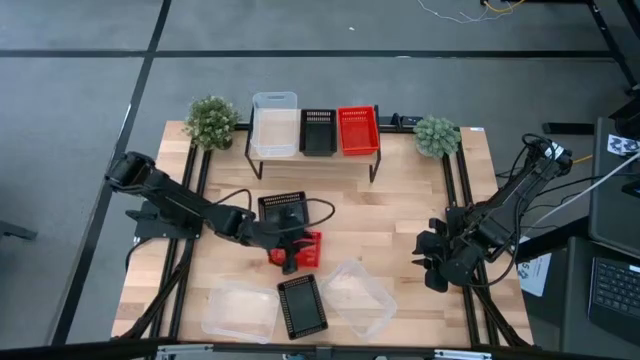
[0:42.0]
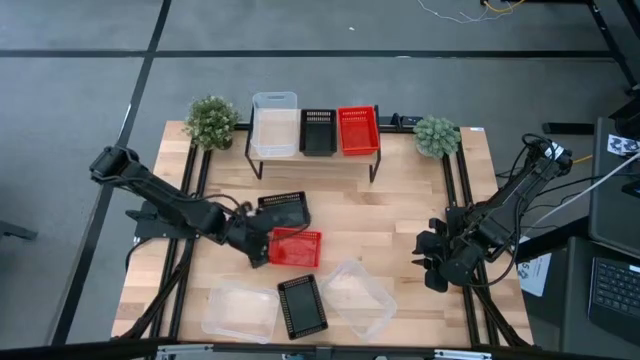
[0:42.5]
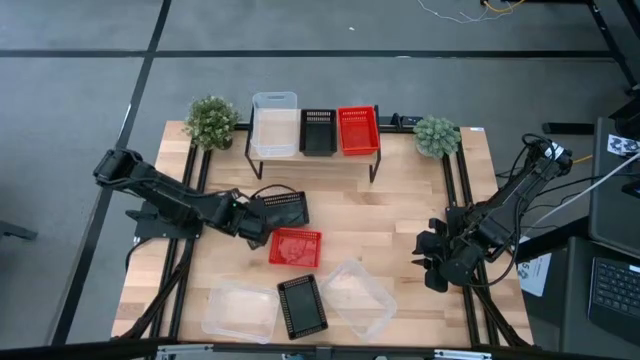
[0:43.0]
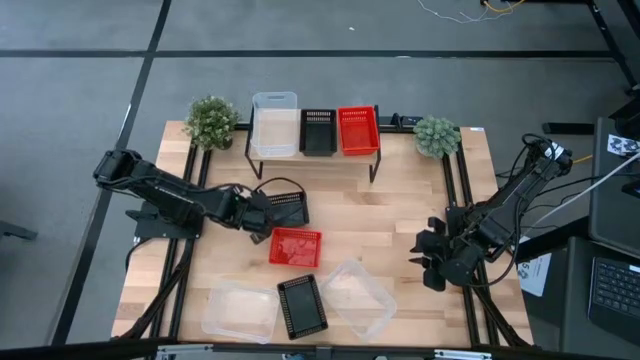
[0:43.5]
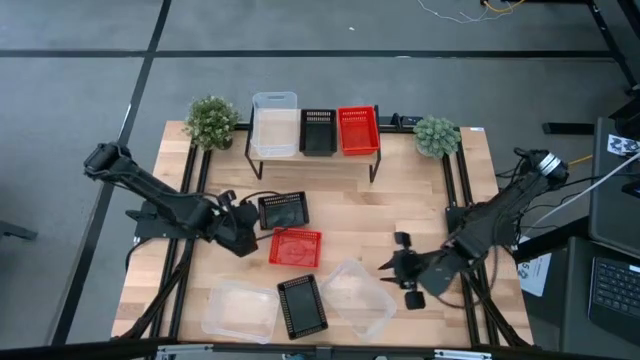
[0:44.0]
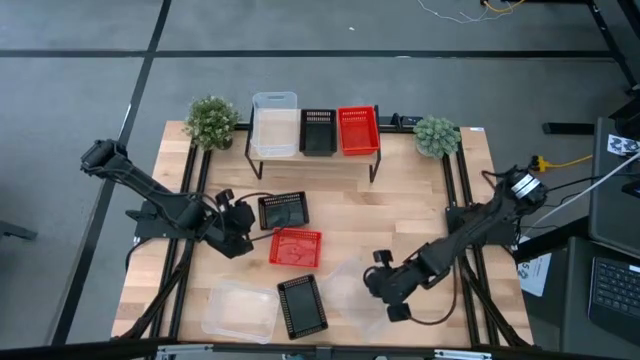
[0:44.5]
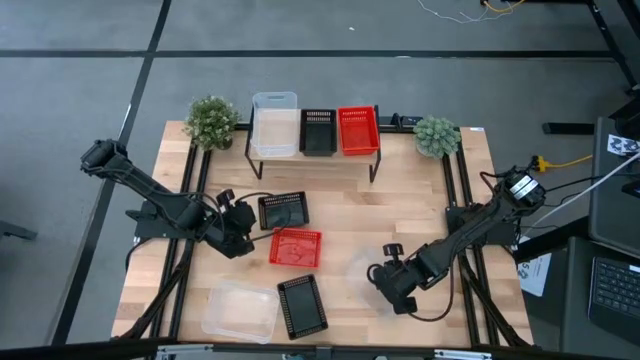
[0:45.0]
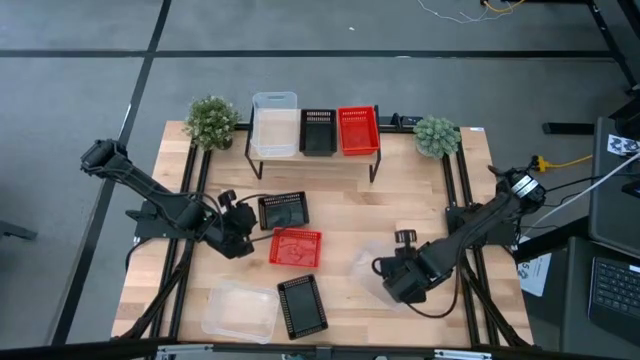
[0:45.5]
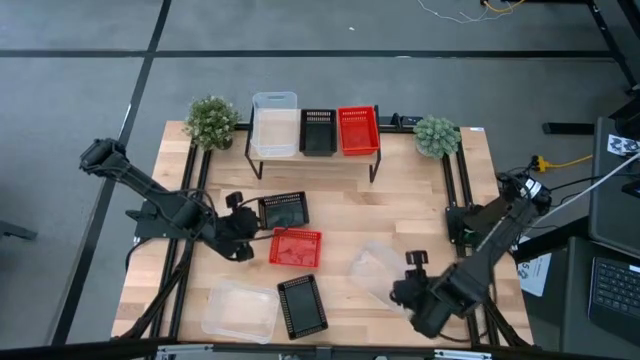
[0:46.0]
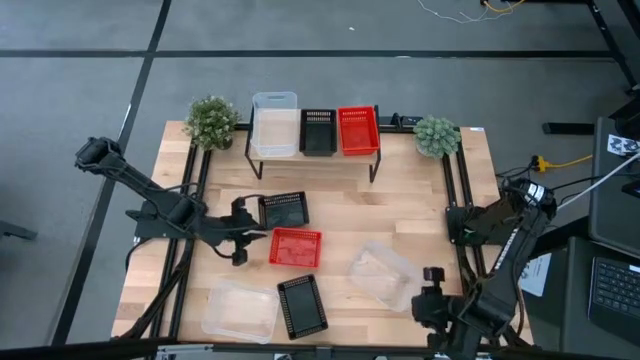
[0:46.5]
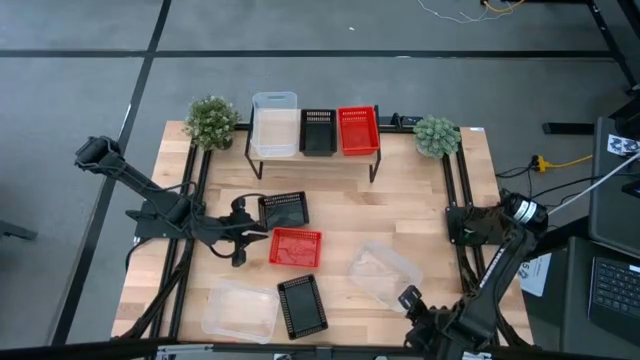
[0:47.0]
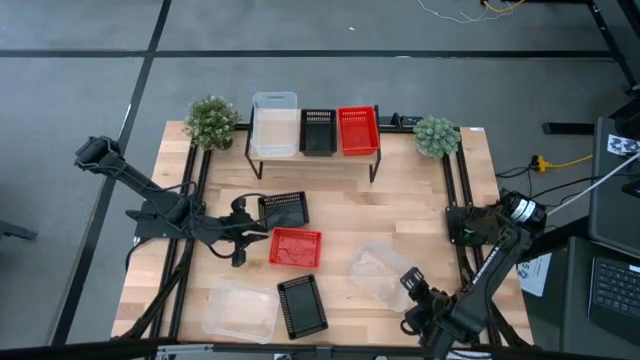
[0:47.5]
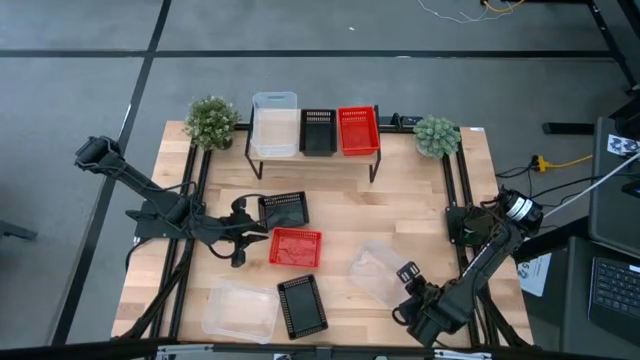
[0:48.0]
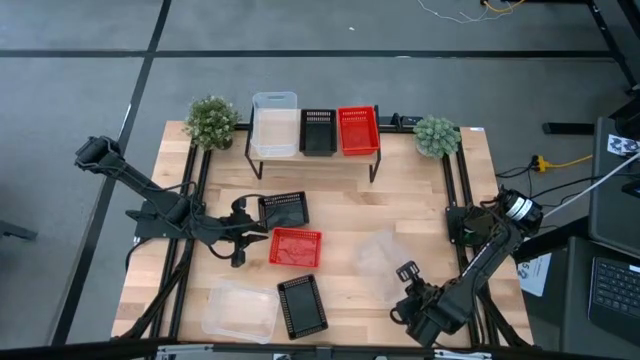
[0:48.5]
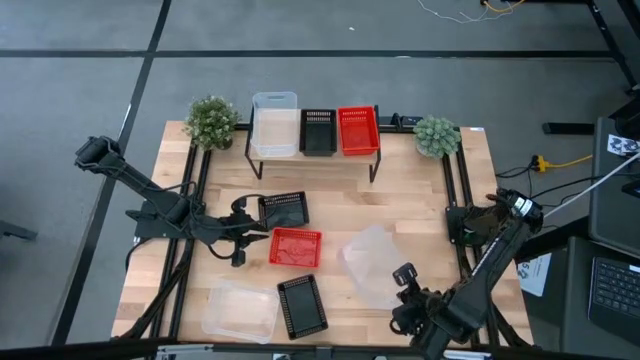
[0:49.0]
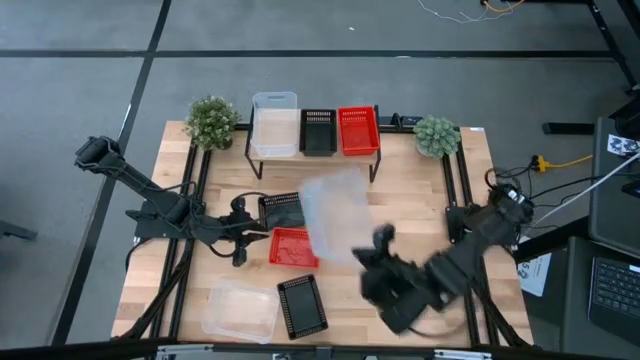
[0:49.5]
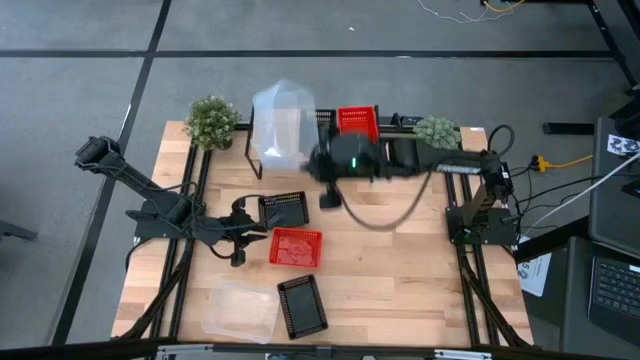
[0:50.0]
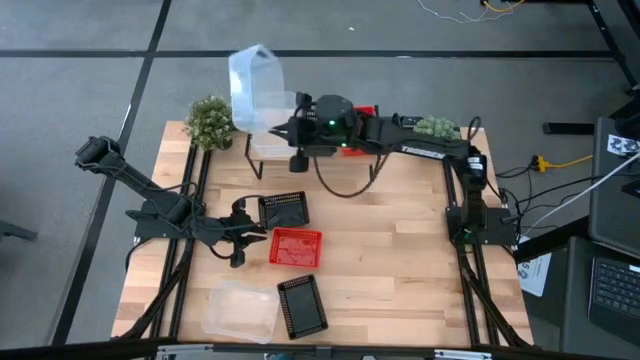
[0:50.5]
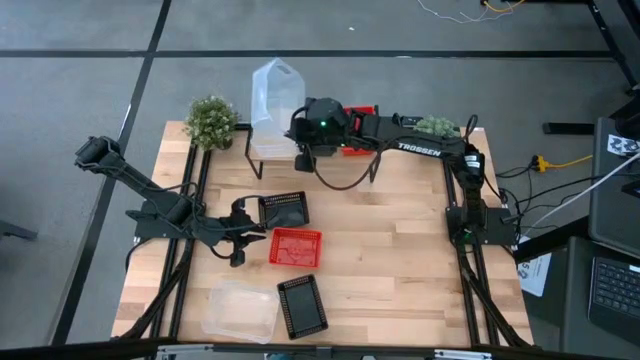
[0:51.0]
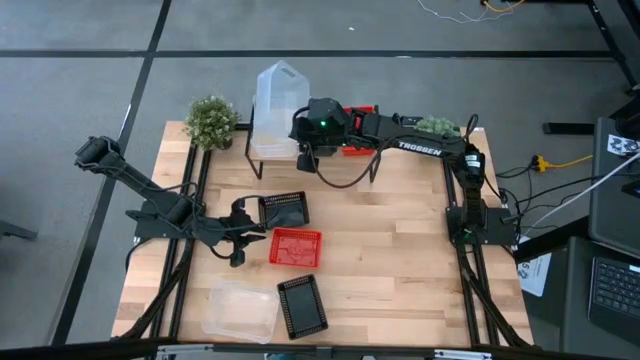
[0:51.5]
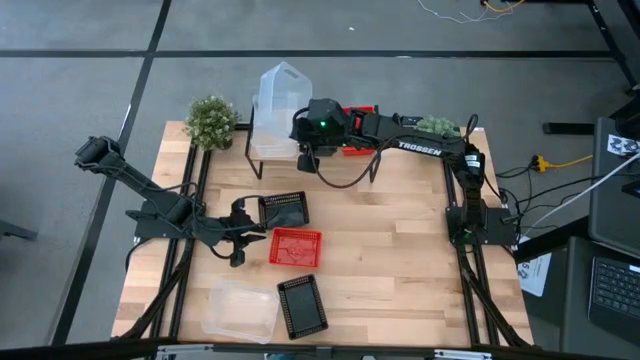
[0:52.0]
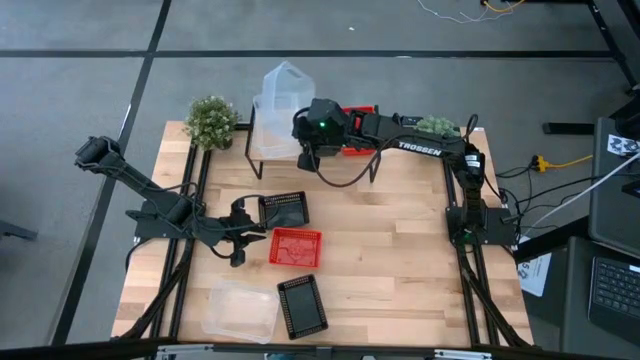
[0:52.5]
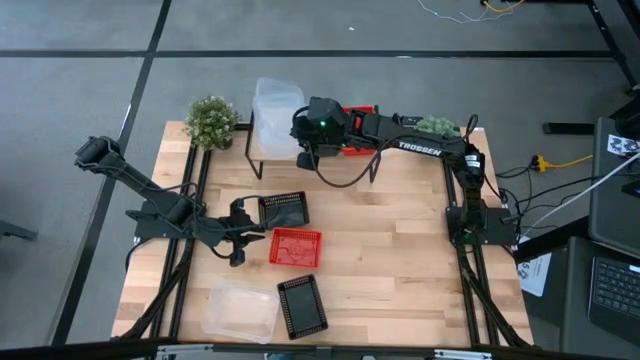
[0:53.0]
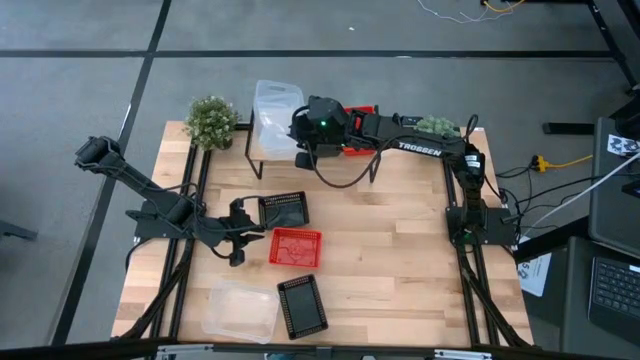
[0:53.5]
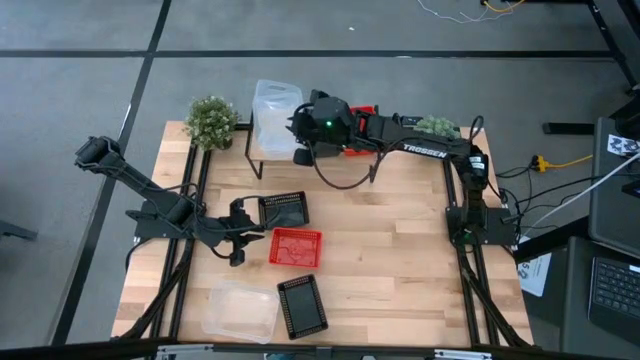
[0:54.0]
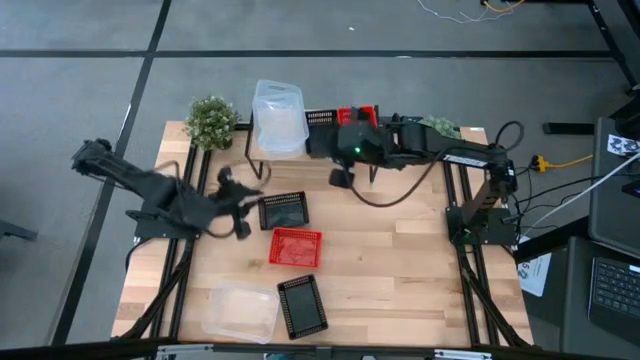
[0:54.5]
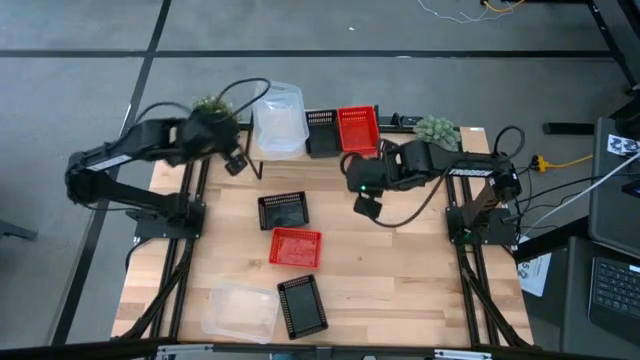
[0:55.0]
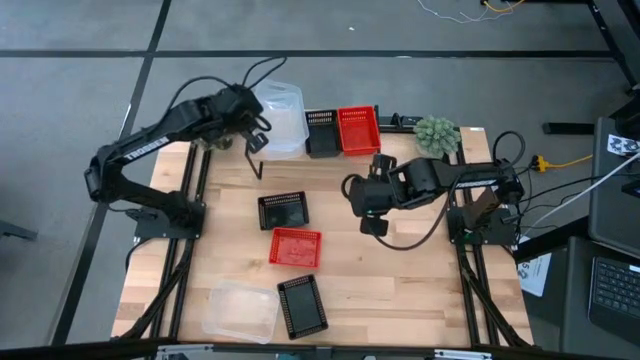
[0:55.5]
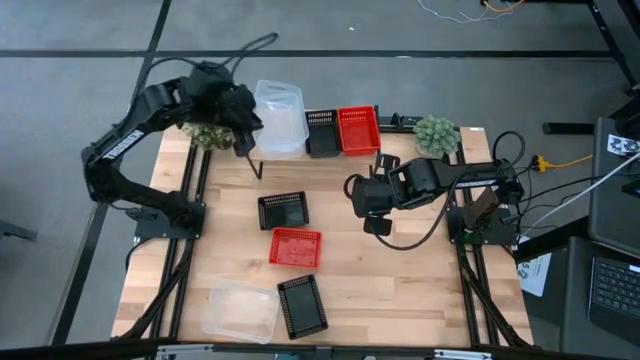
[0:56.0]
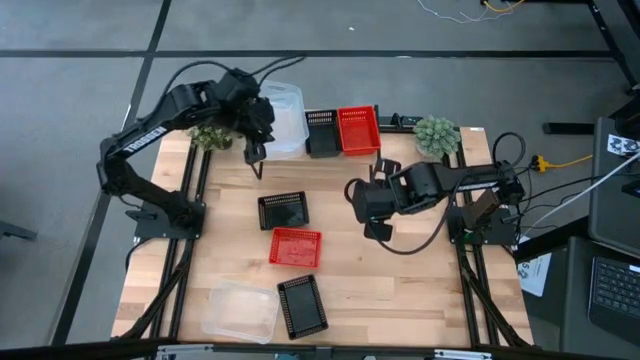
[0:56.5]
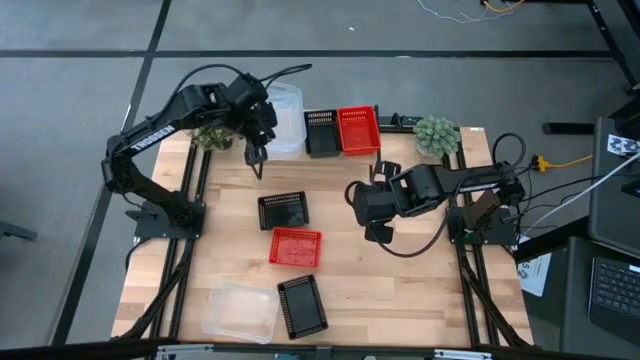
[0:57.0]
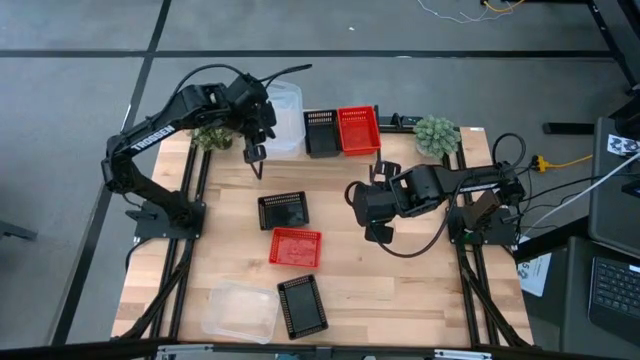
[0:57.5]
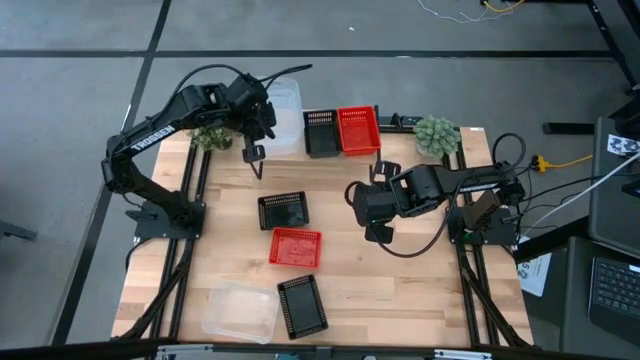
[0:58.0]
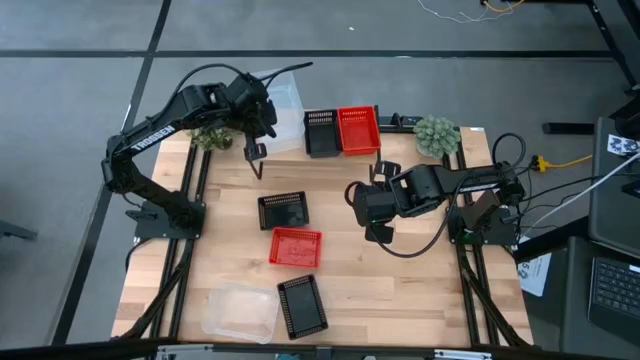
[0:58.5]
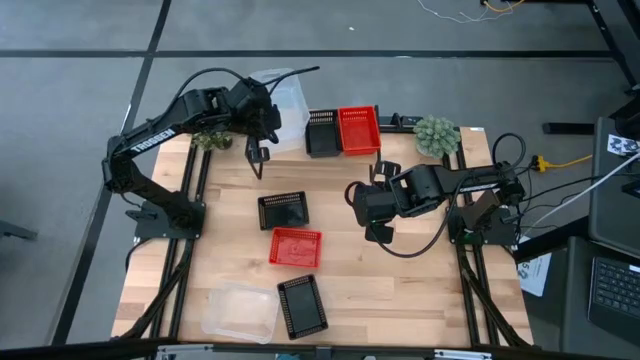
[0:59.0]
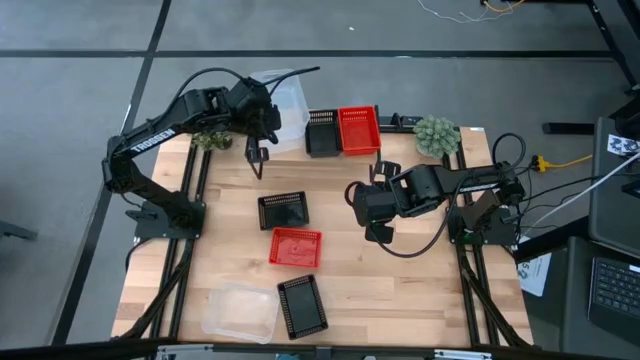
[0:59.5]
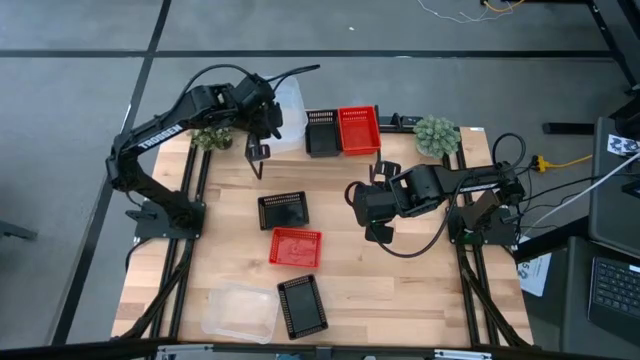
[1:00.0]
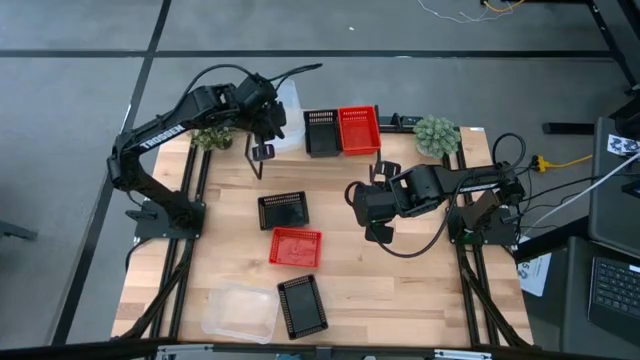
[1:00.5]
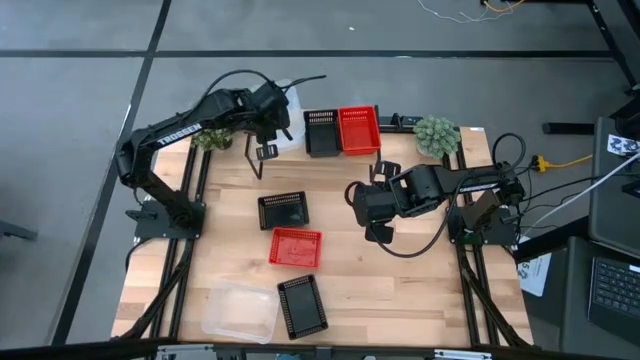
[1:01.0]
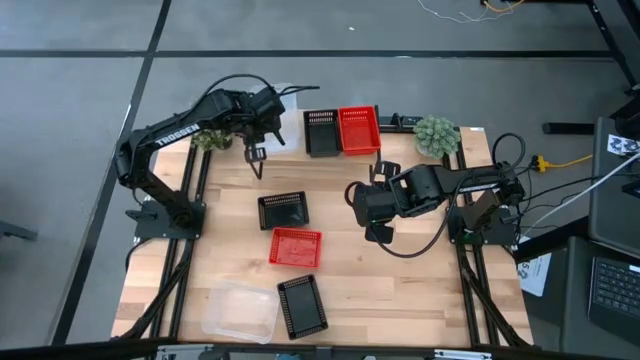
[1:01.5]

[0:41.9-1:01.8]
Task: Stack baskets on shelf by color
Stack the right transparent bin on top of the transparent bin on the shelf

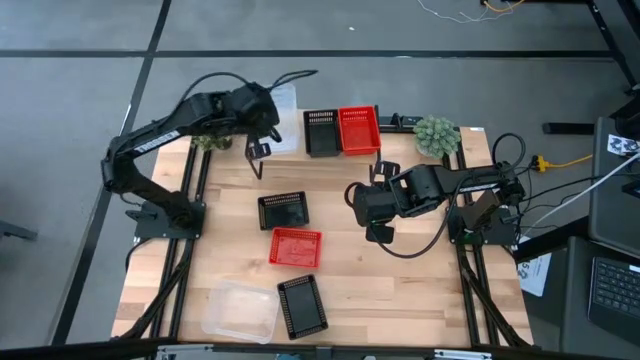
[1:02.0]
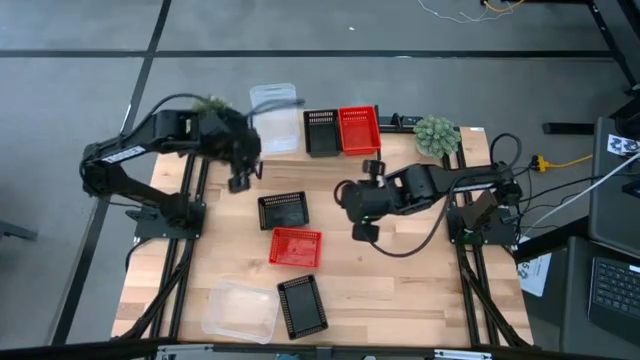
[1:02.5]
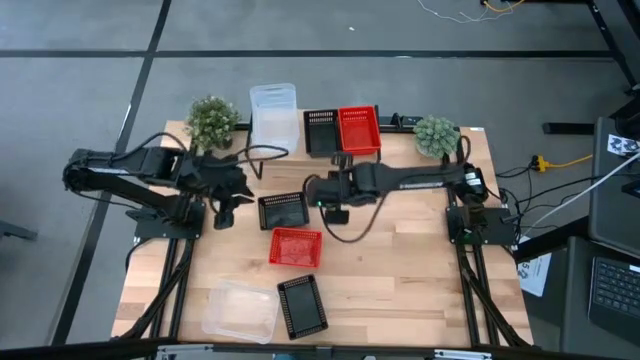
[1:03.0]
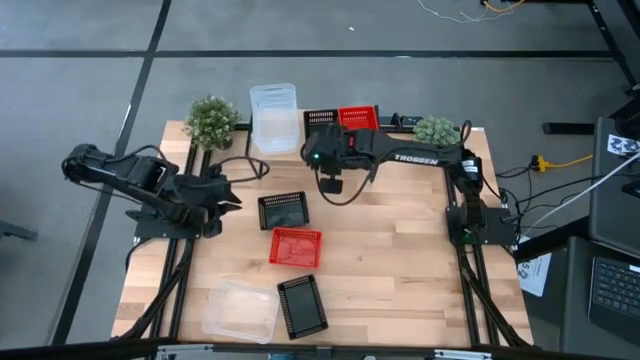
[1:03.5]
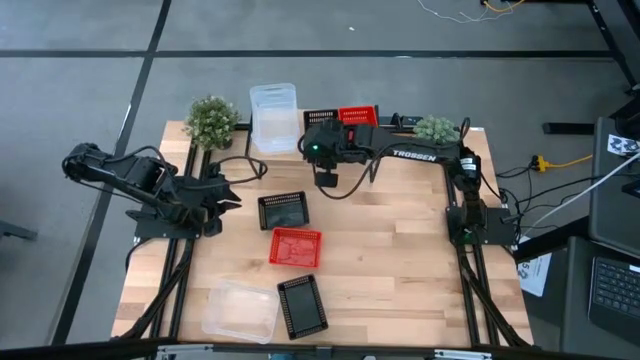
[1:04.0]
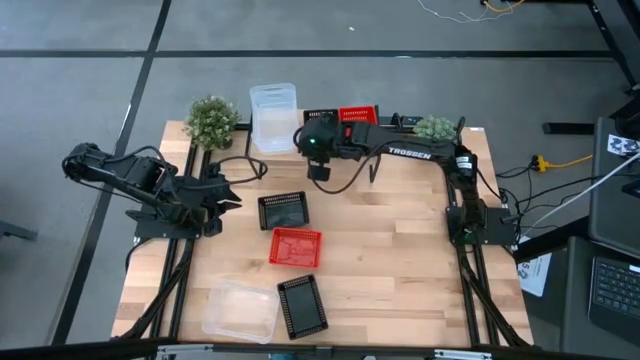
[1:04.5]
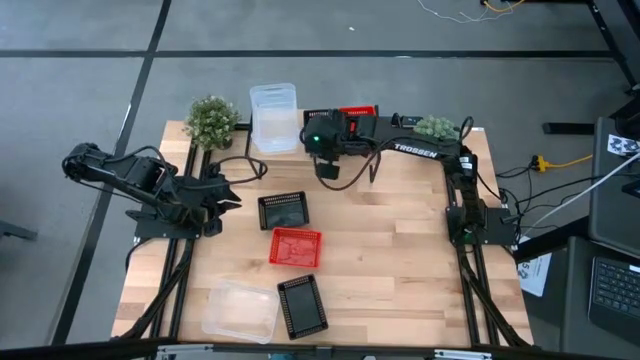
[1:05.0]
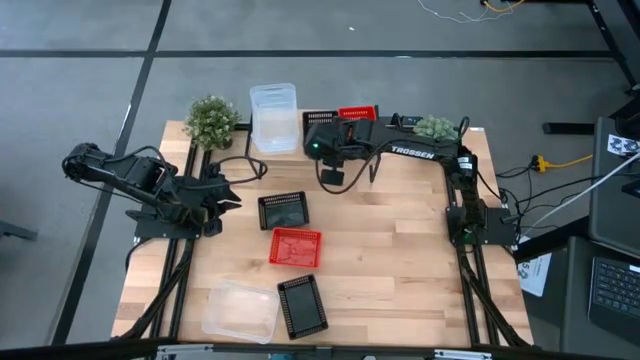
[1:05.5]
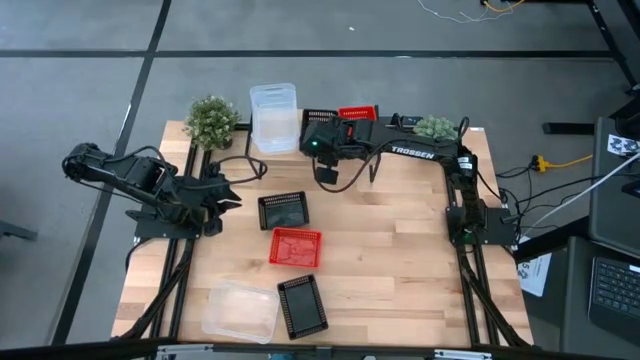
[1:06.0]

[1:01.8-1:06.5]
Adjust the black bin on the shelf
